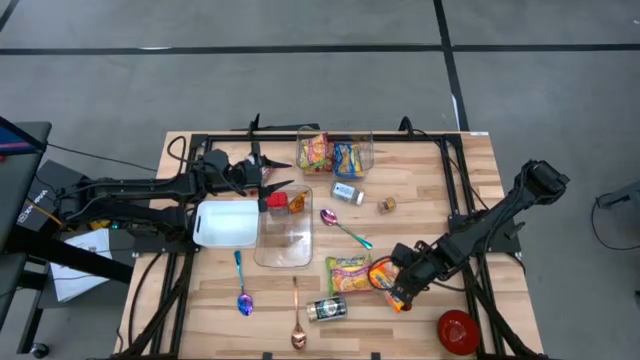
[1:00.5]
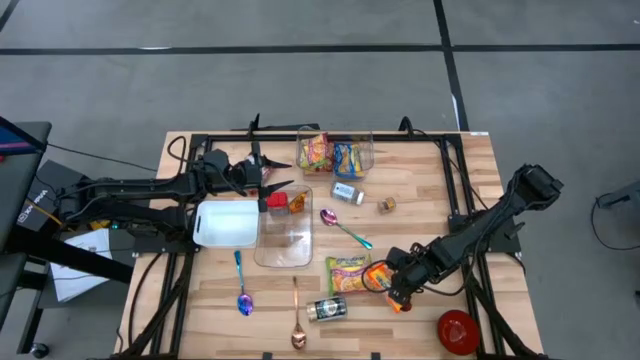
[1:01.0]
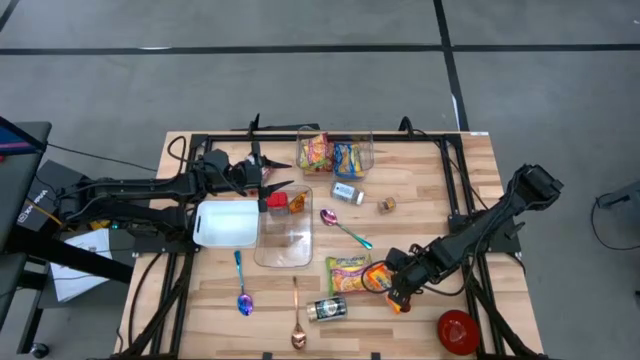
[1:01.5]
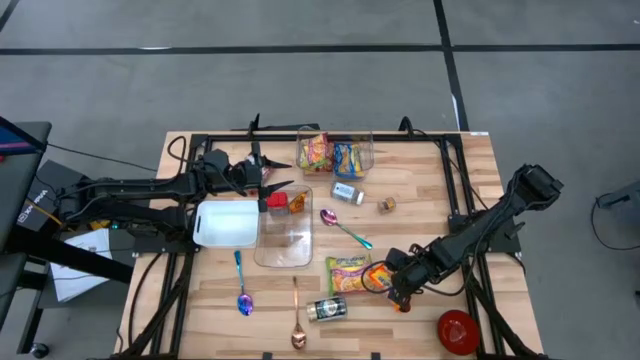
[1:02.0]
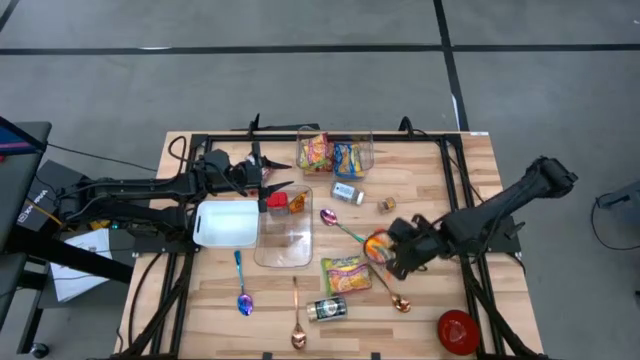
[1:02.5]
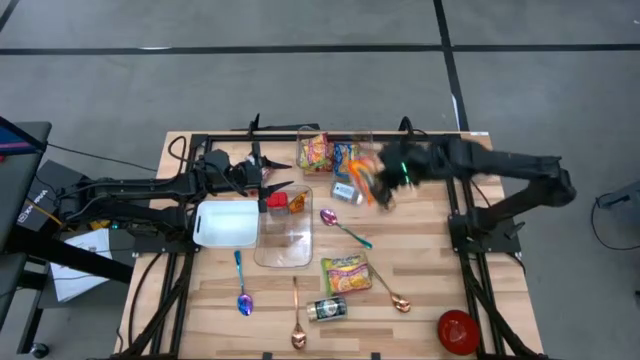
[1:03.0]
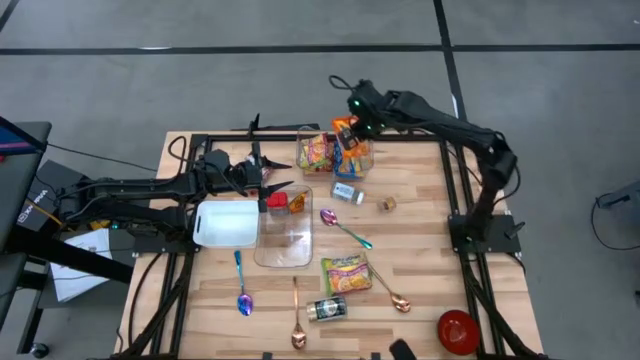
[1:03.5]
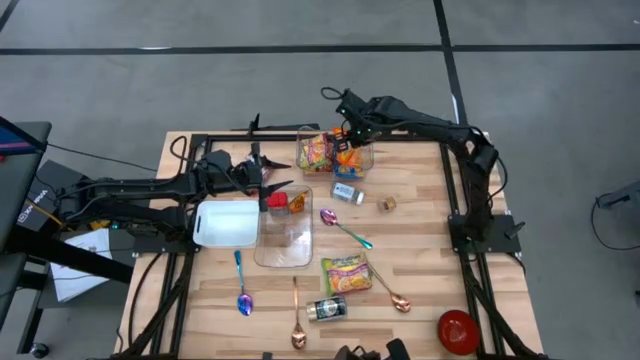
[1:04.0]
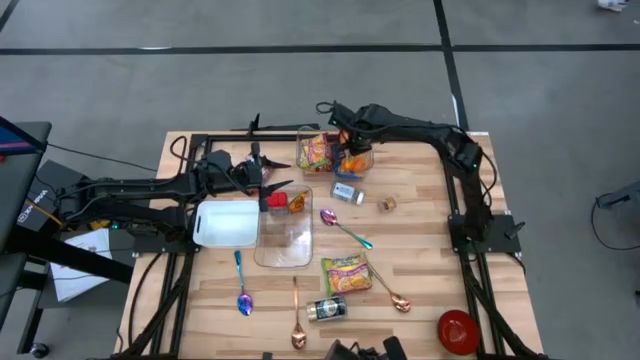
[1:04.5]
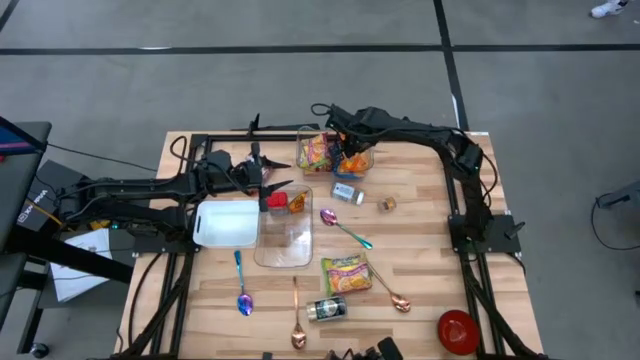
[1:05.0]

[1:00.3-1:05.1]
Task: Pick & Place Food Item
Put the orange noodle pack into the top transparent bin

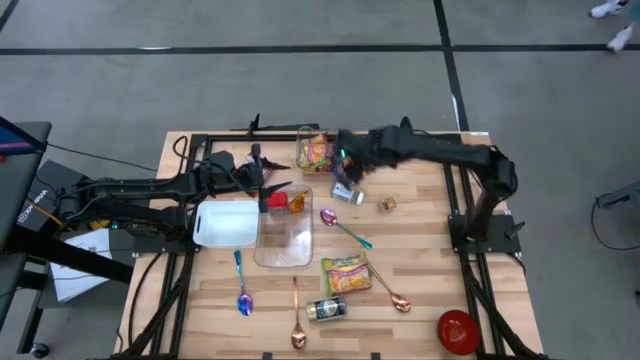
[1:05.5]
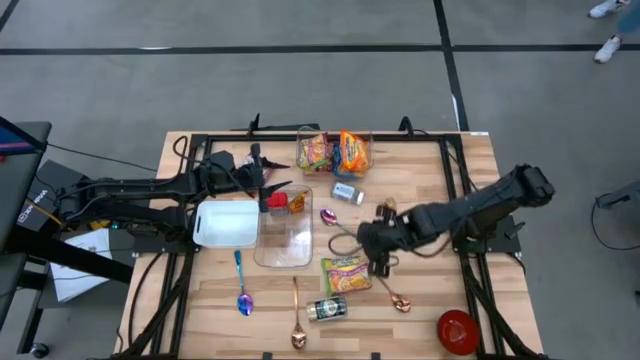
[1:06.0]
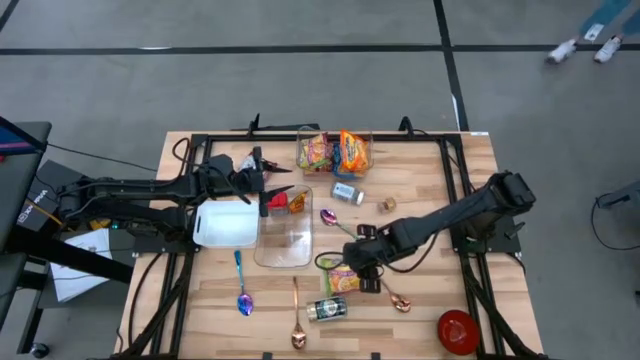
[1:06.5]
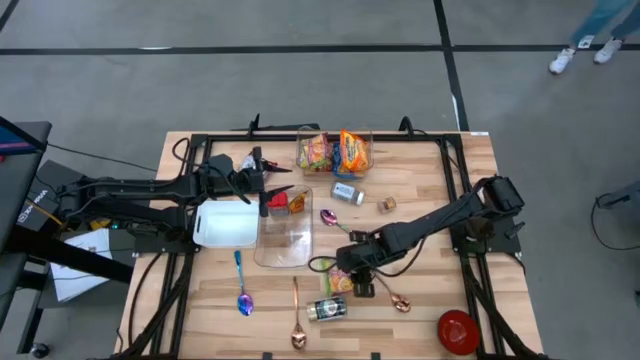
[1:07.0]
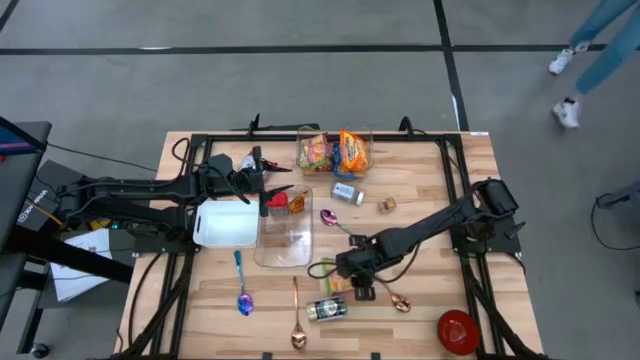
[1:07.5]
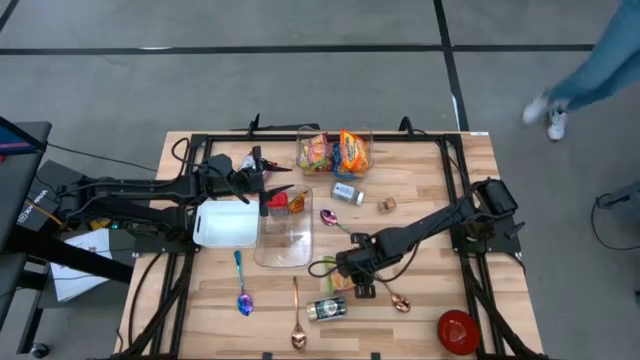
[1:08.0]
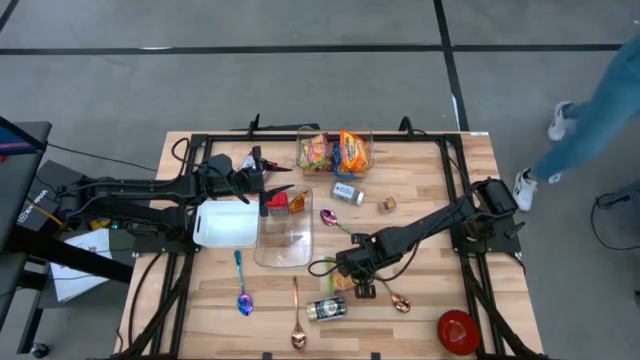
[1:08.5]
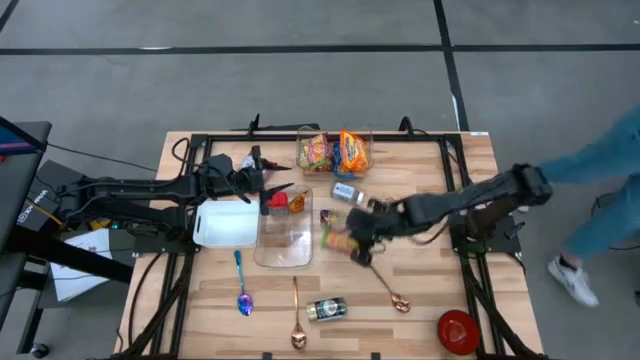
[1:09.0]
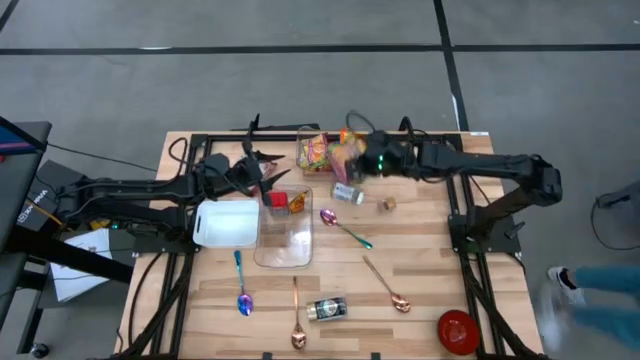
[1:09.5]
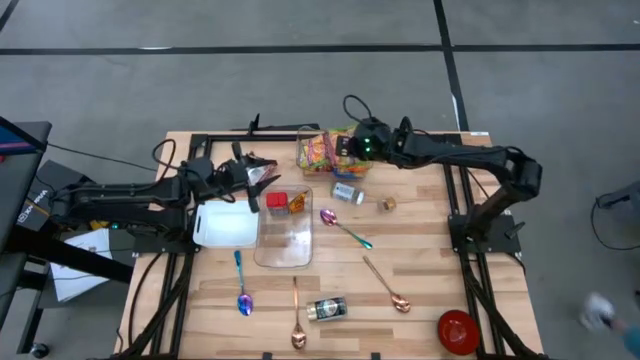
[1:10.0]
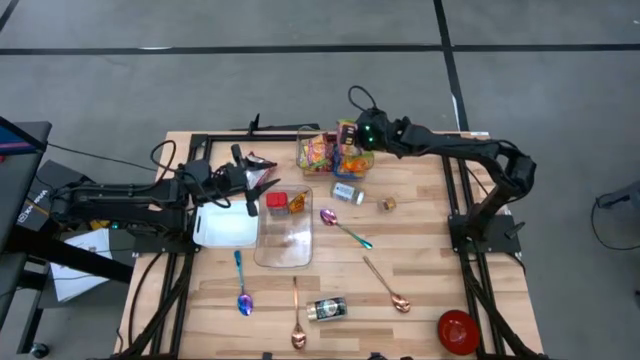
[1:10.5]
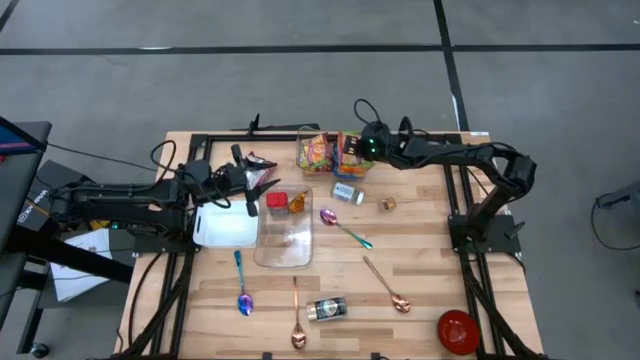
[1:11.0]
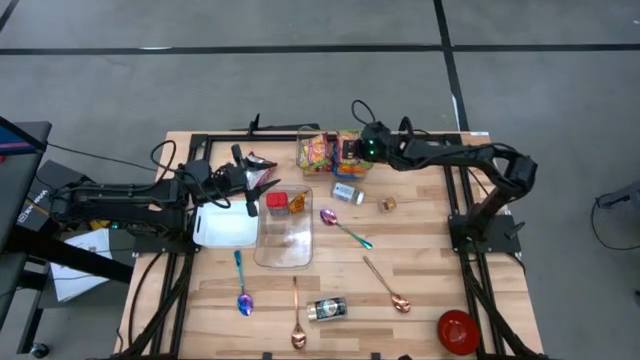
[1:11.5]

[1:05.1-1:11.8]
Put the green noodle pack into the top transparent bin

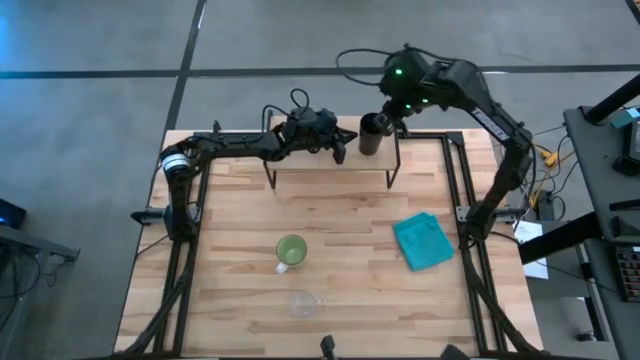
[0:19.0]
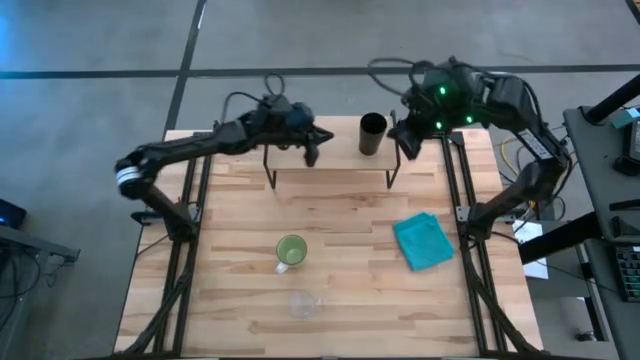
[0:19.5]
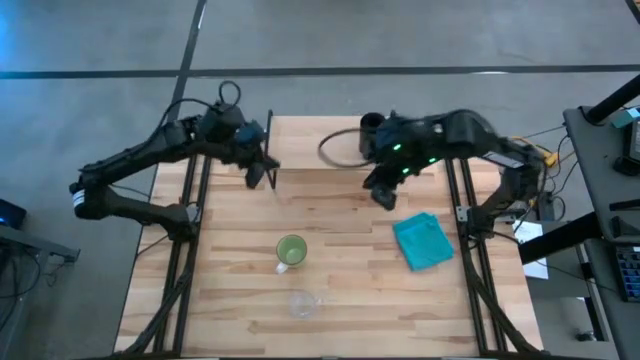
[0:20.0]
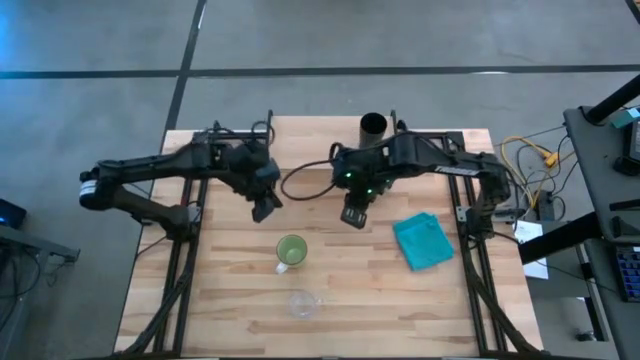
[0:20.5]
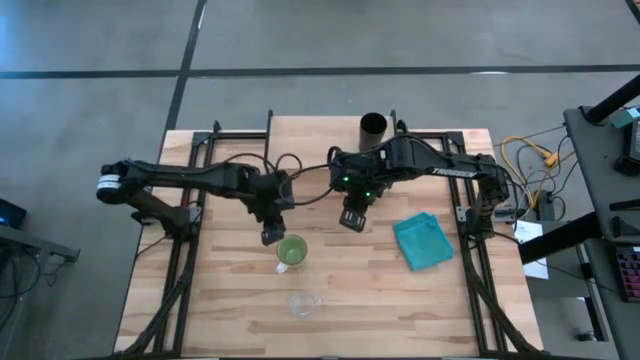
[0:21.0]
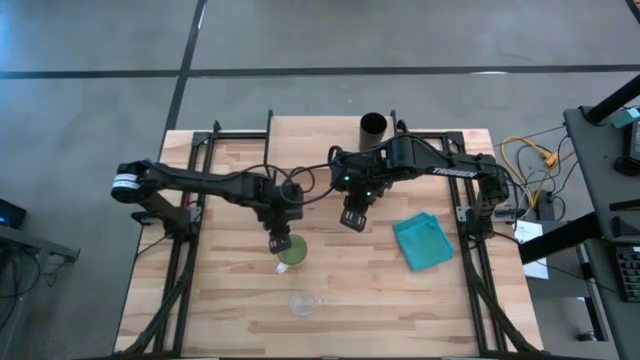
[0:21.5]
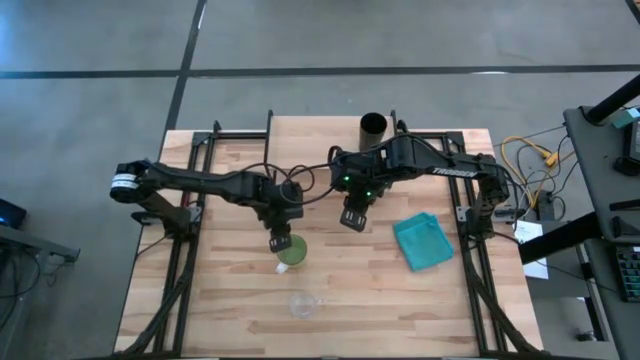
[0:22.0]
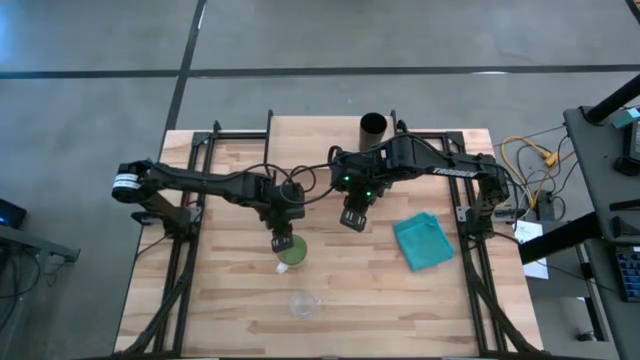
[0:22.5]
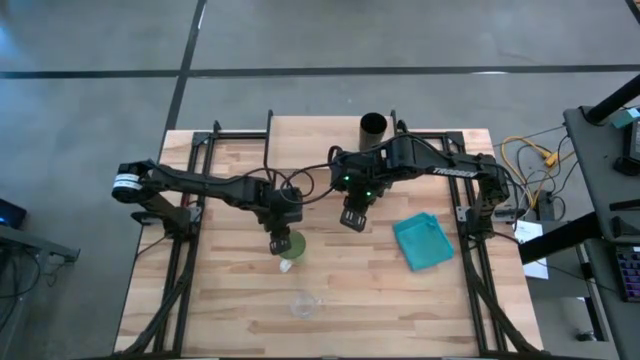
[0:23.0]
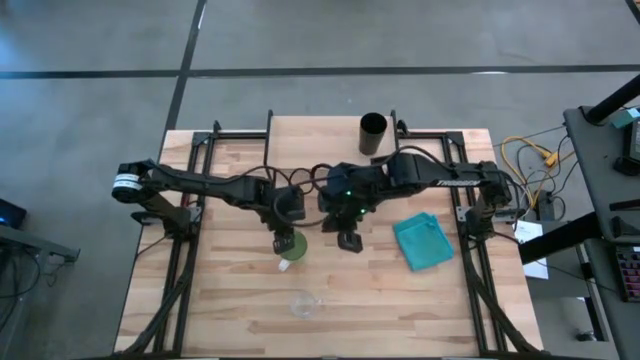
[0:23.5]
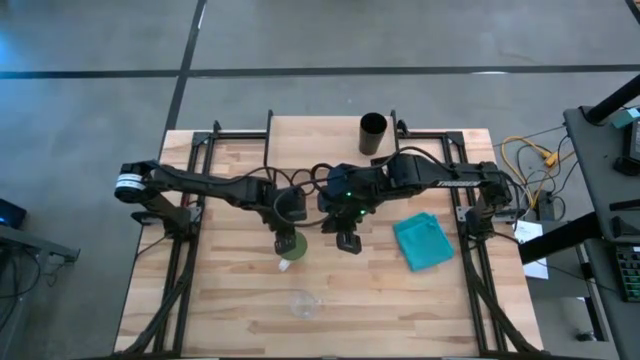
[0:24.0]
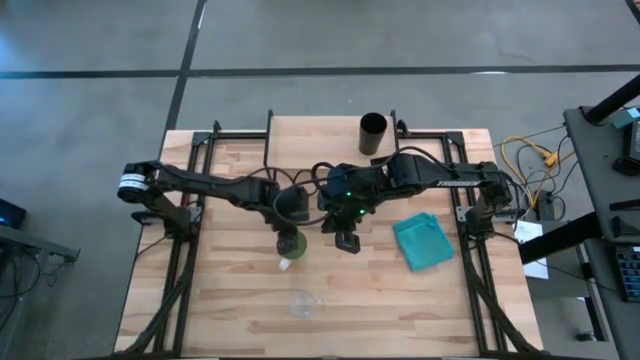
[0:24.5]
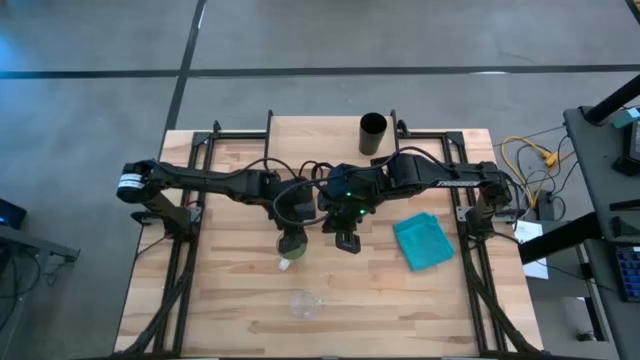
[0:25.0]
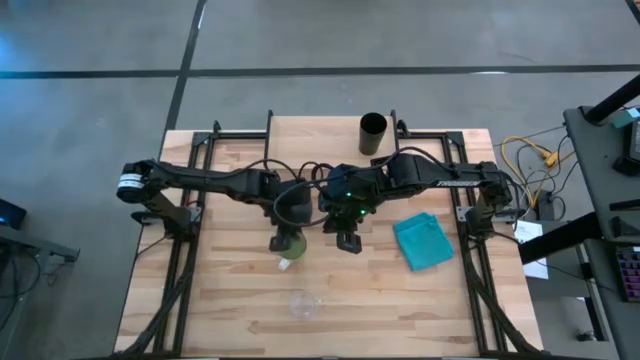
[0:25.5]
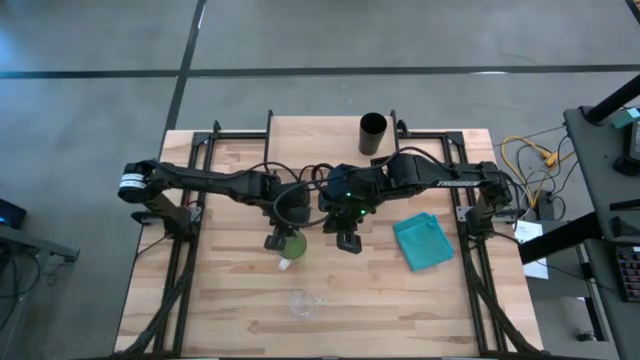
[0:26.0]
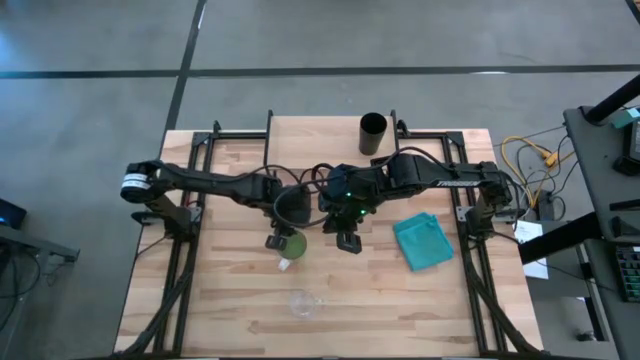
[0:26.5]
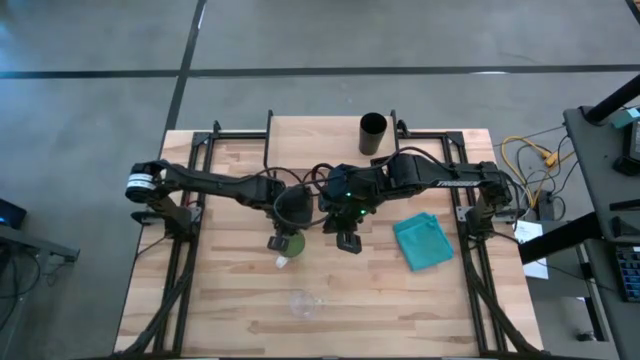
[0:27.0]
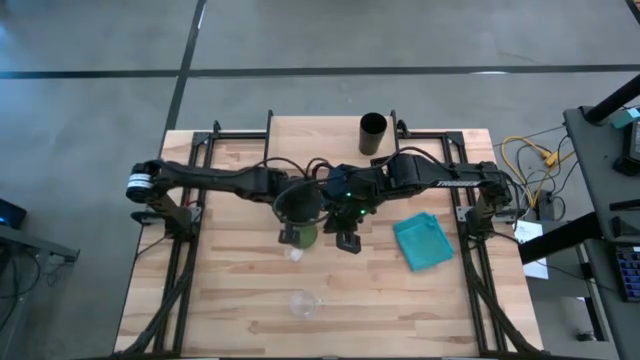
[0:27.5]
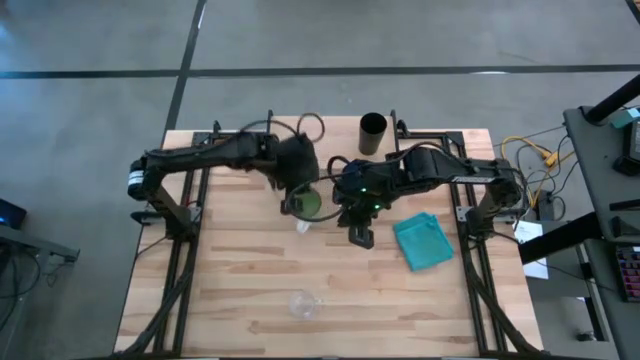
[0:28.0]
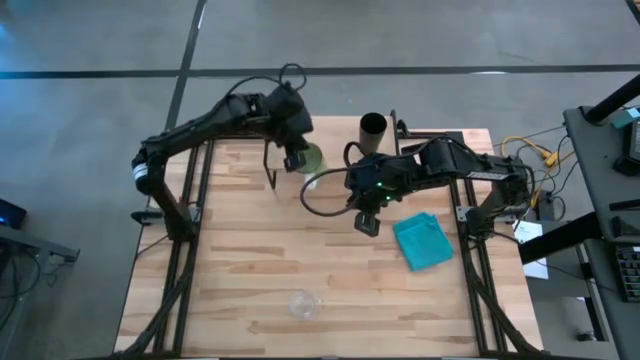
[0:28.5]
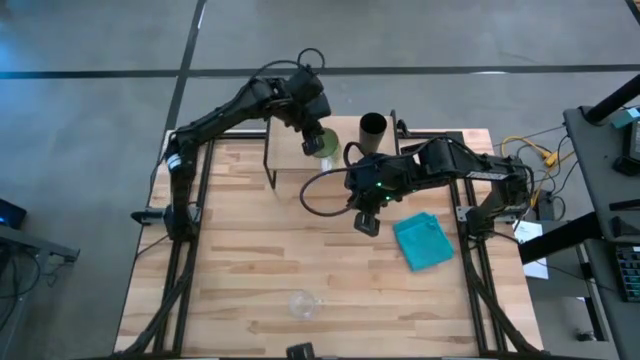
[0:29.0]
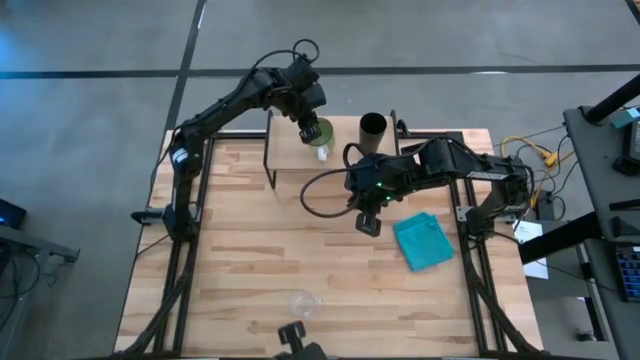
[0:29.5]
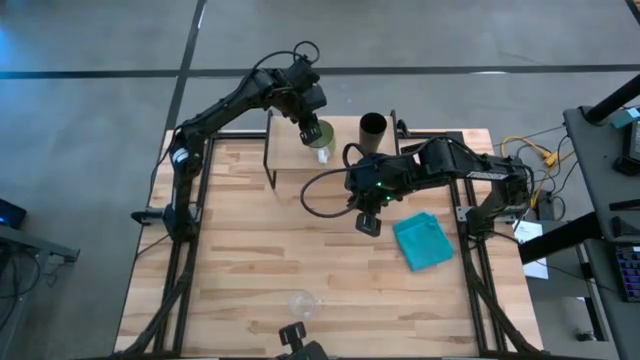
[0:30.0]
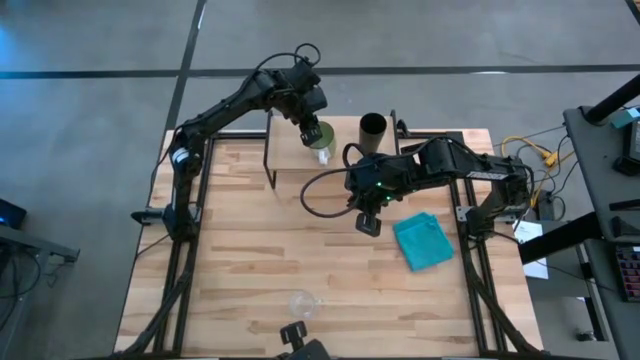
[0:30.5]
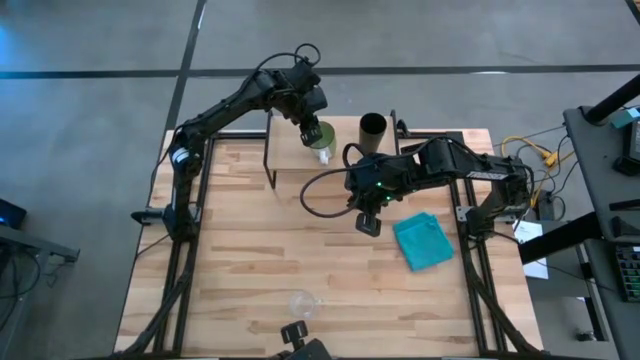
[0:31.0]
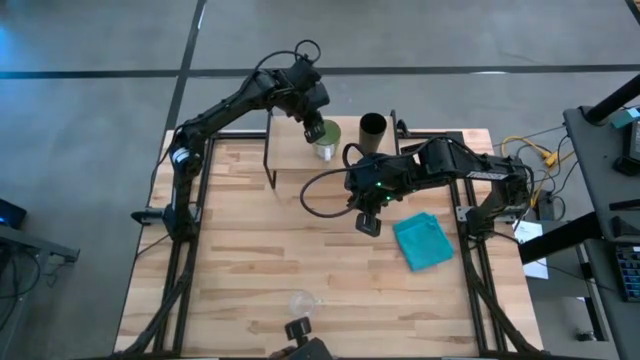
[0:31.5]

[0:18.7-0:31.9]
Task: Stack small to large cups/mugs on shelf
Put the green mug on the shelf
